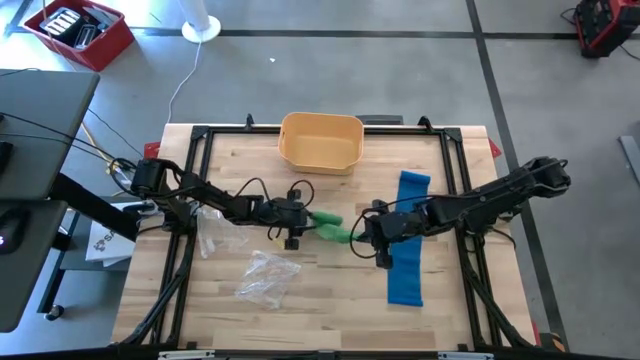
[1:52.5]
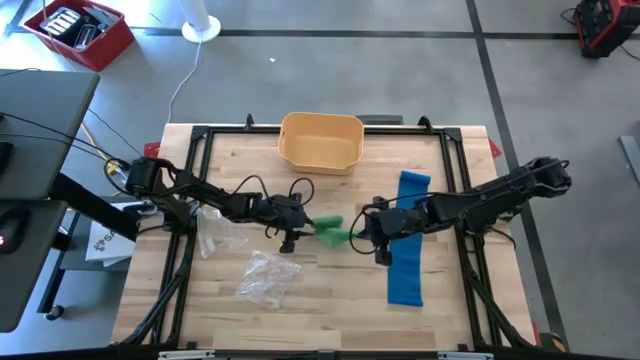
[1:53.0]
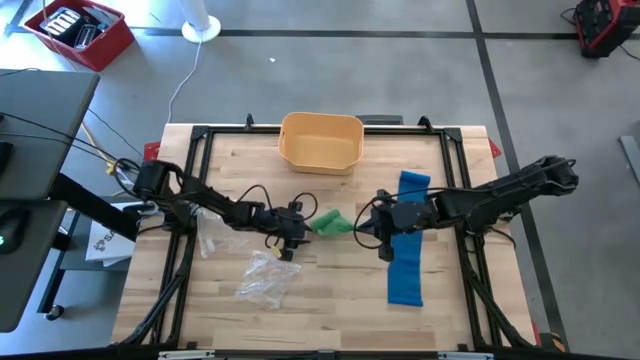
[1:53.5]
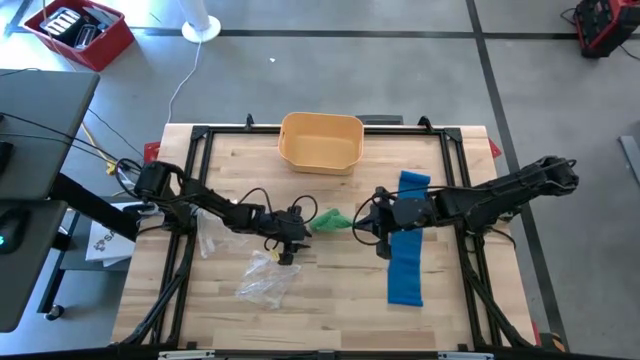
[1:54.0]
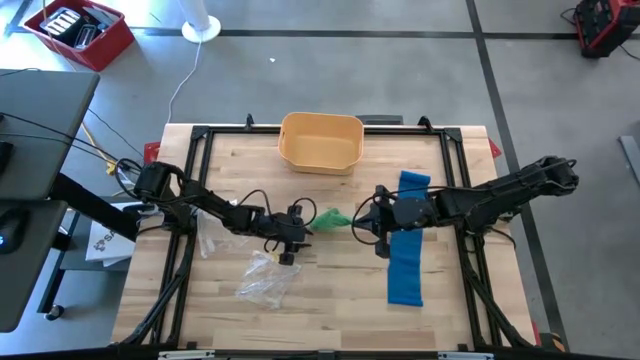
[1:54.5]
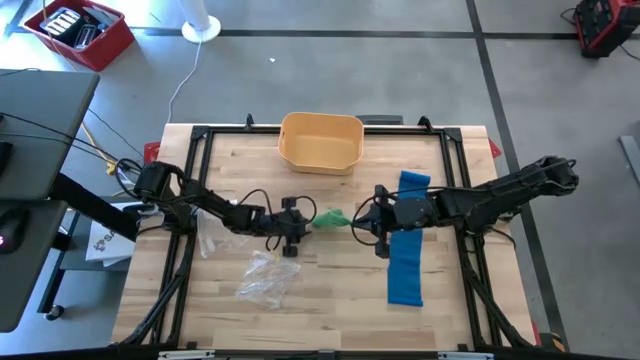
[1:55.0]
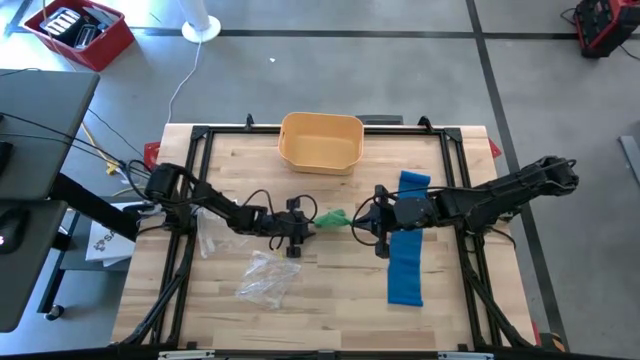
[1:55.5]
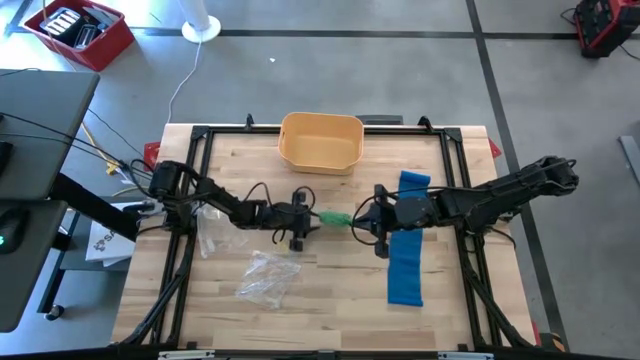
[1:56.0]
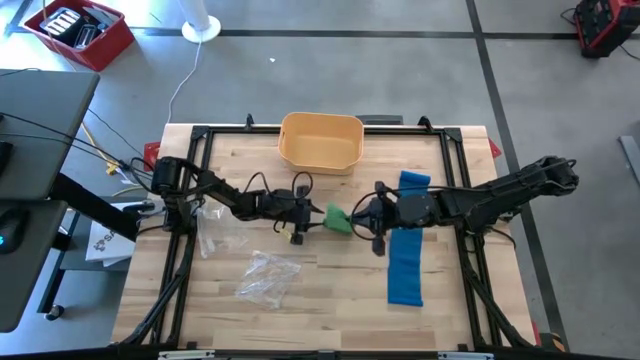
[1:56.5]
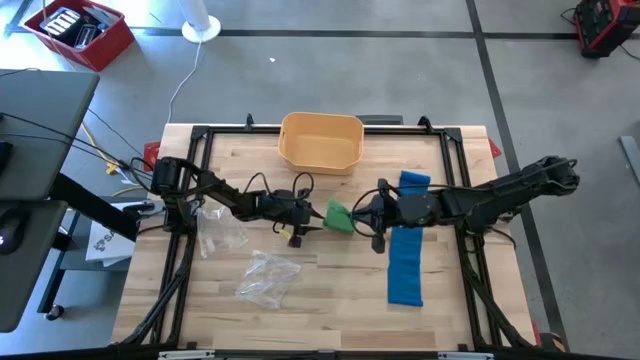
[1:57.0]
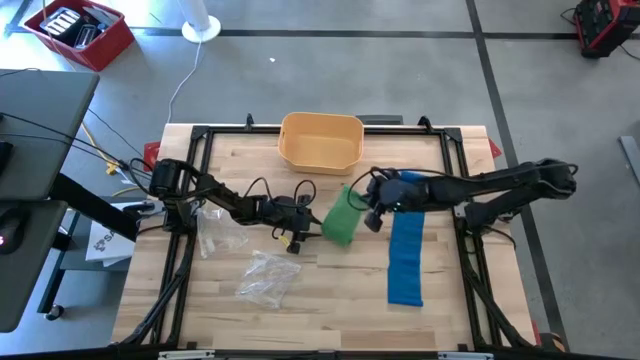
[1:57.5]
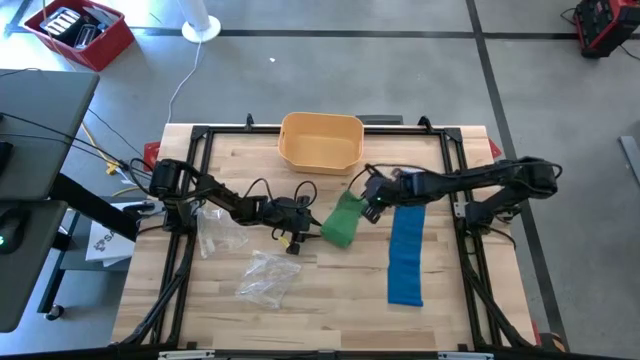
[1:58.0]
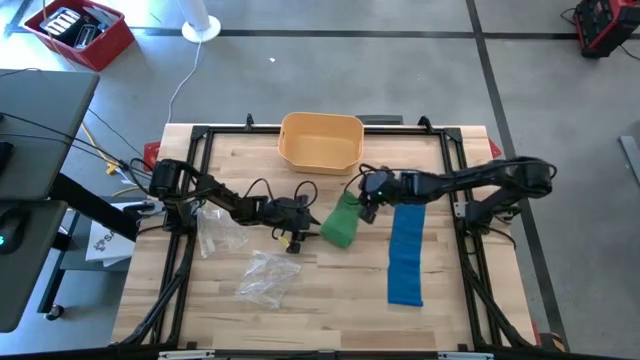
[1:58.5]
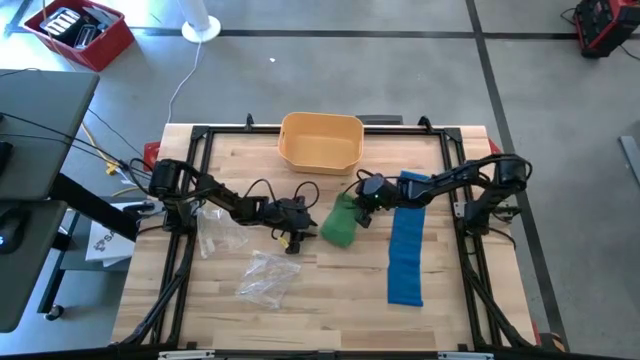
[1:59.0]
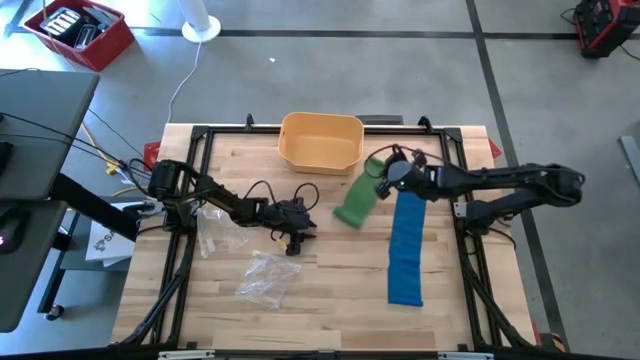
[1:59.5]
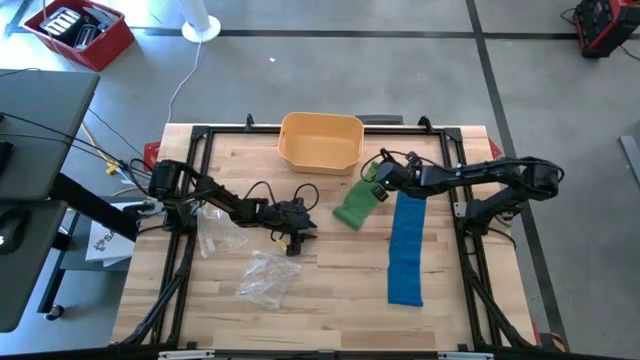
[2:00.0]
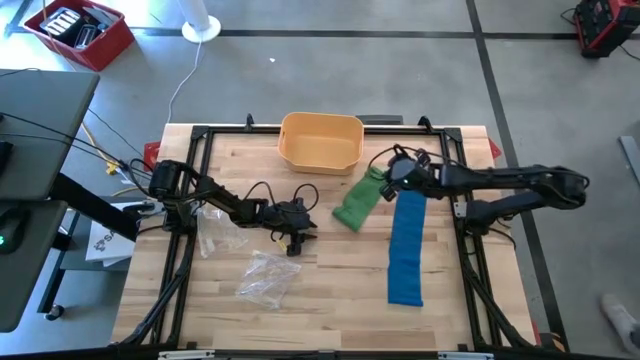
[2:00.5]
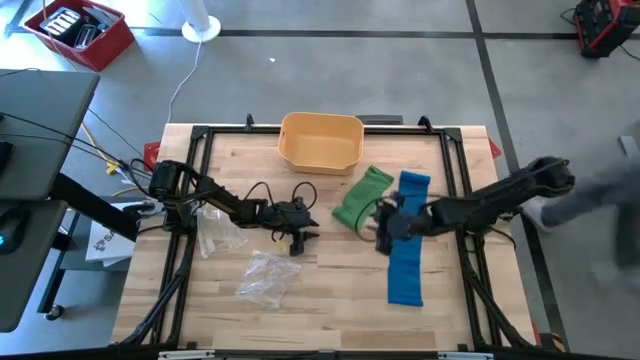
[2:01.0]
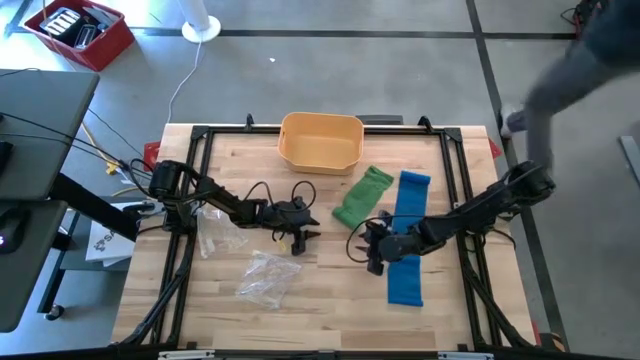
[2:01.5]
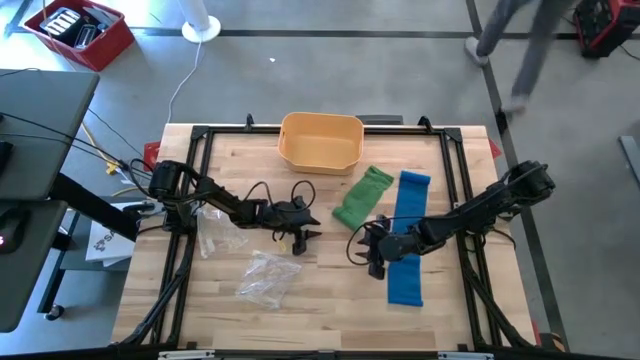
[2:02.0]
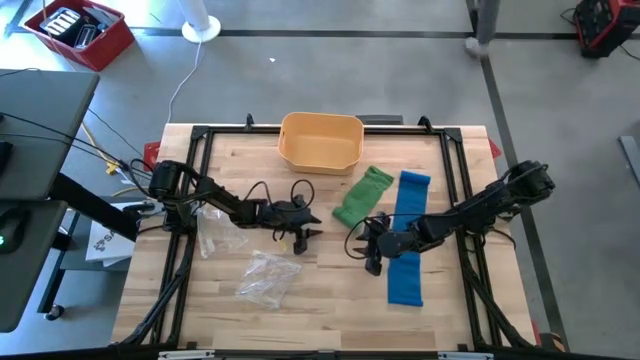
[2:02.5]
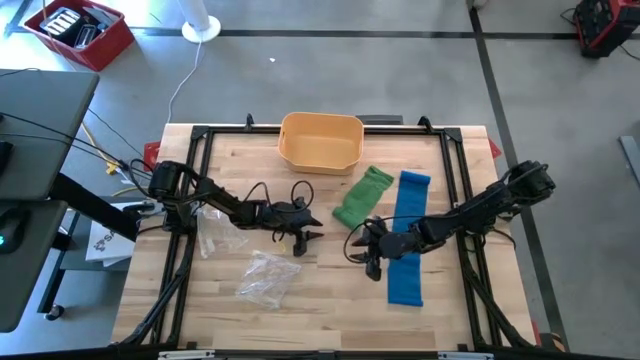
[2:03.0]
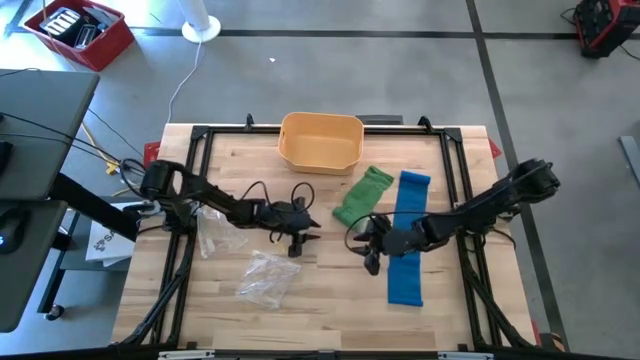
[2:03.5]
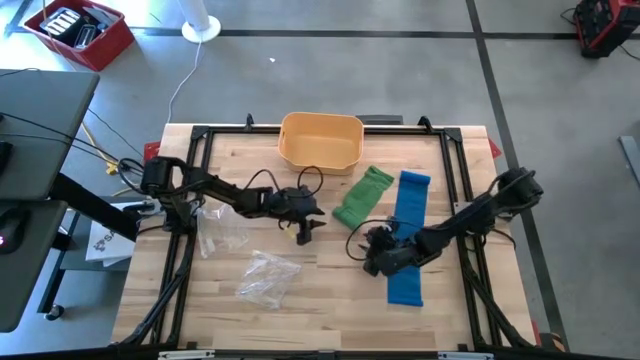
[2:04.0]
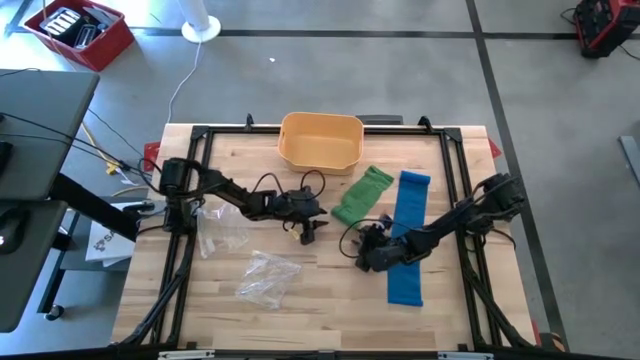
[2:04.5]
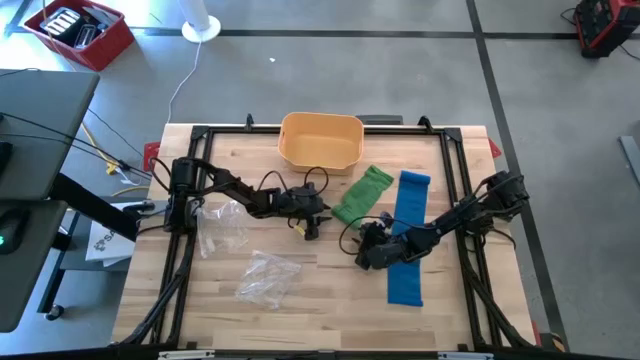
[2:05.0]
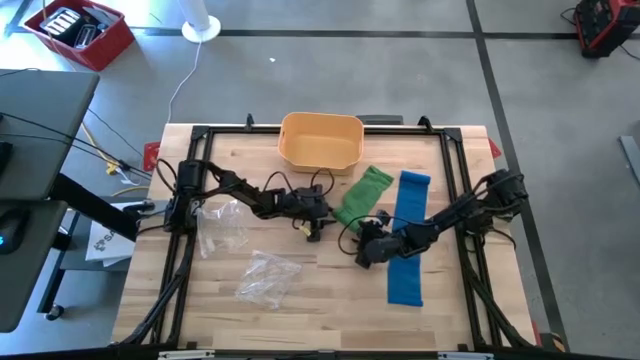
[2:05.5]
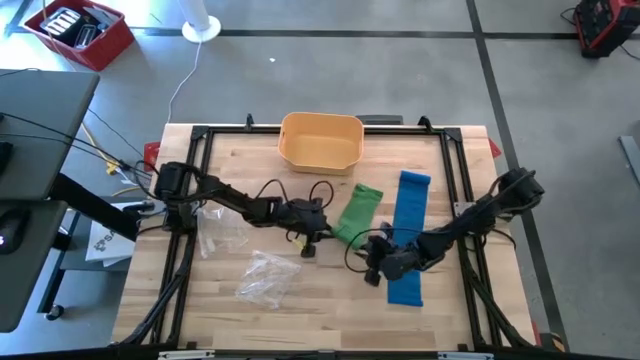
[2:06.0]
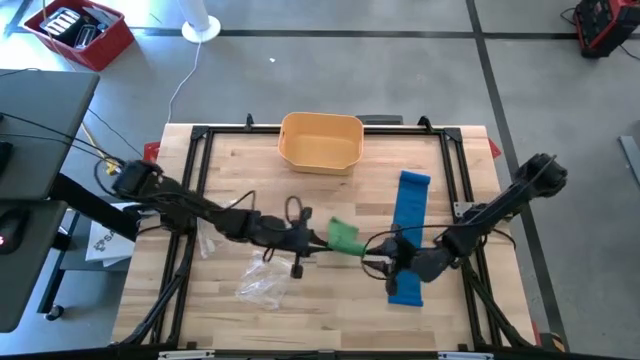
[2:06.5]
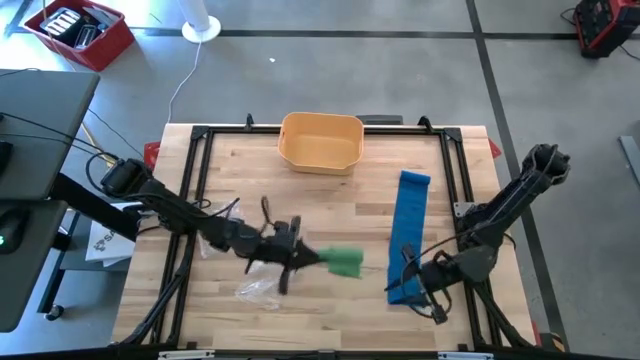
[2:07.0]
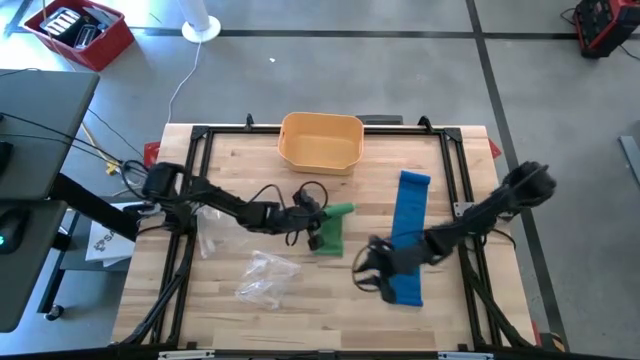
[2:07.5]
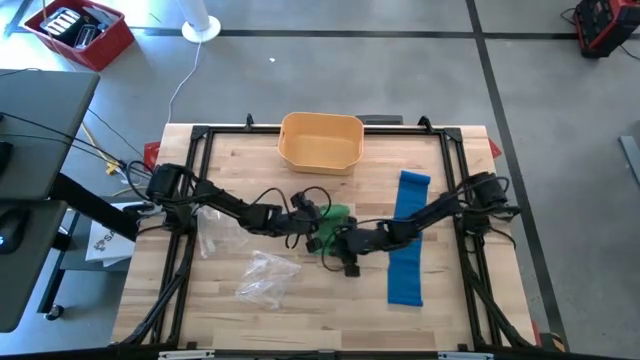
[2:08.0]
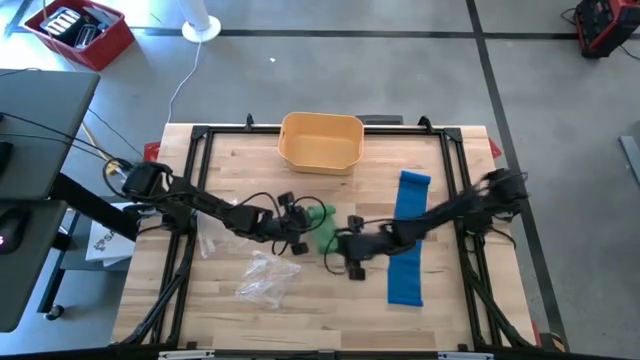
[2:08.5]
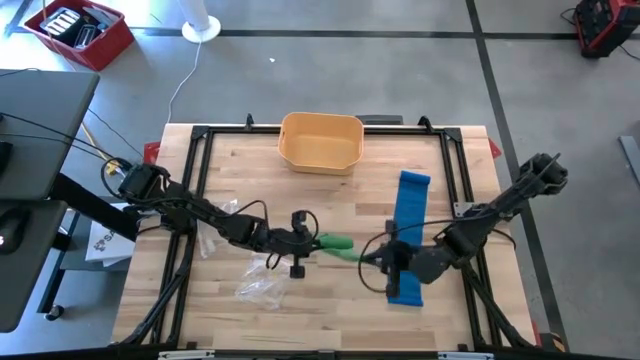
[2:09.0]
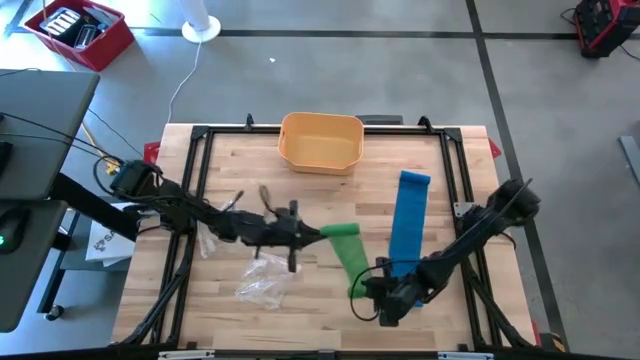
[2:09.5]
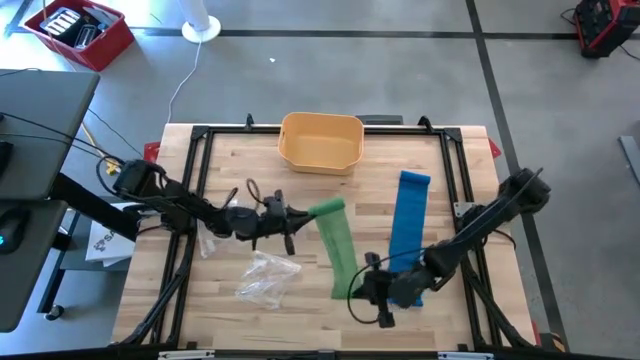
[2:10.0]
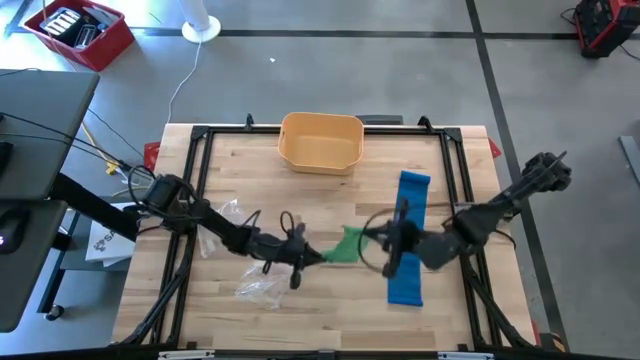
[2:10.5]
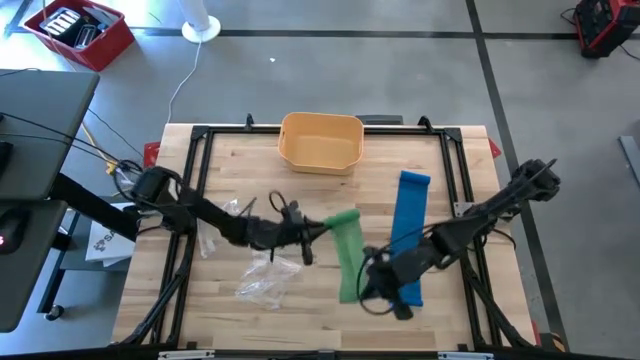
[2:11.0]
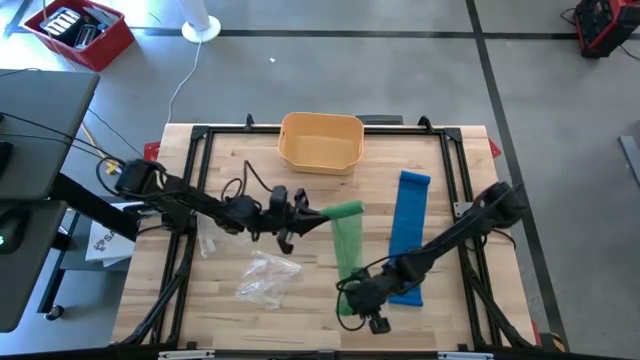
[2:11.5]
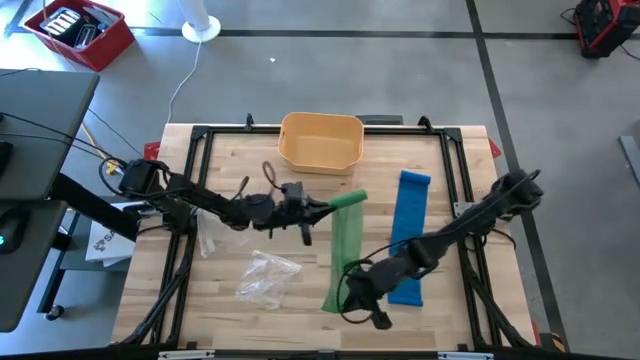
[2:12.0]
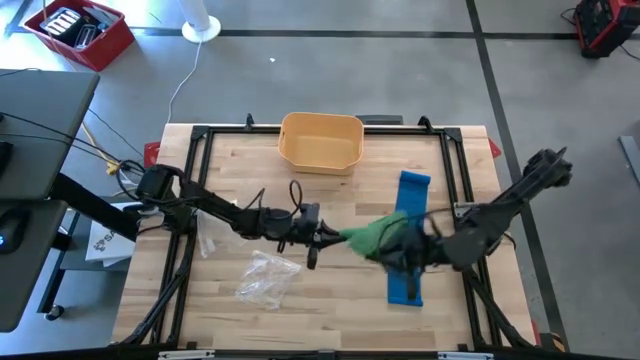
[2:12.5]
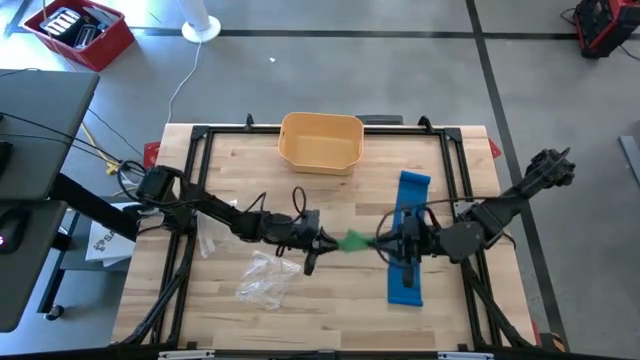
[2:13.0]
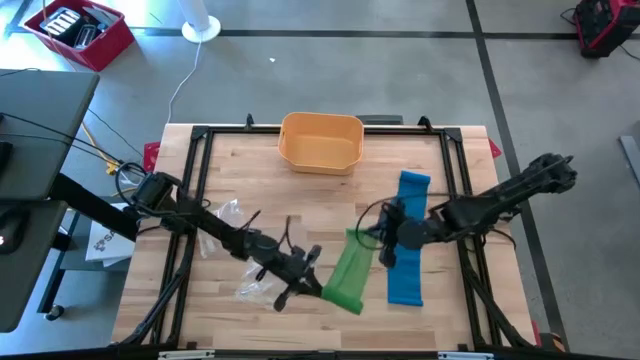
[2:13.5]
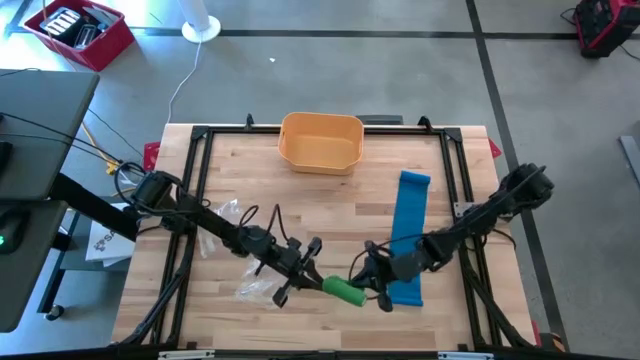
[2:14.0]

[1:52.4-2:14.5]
Task: Roll bandage
Roll the green bandage
